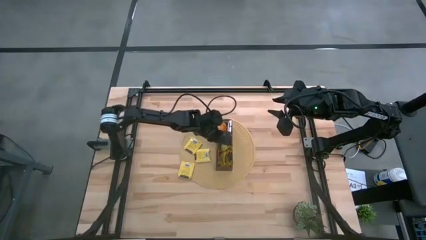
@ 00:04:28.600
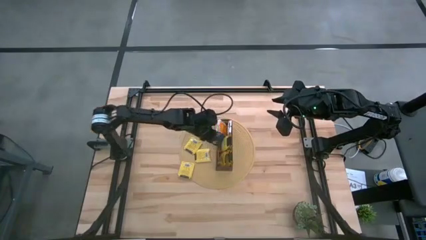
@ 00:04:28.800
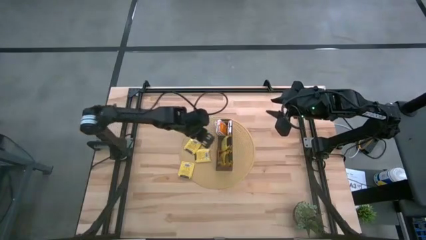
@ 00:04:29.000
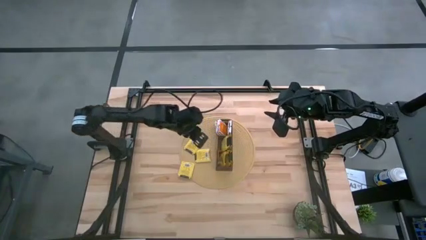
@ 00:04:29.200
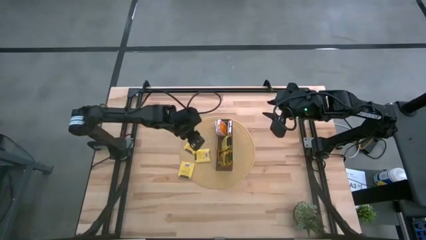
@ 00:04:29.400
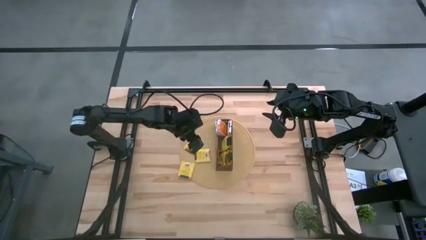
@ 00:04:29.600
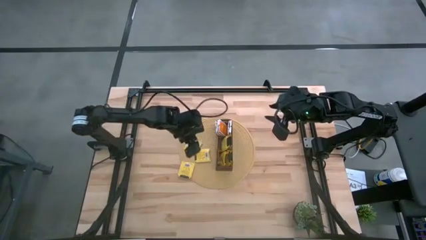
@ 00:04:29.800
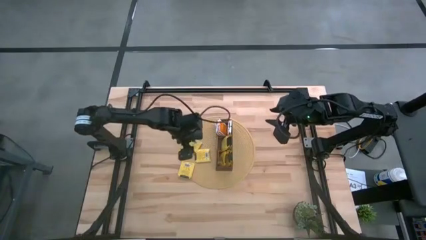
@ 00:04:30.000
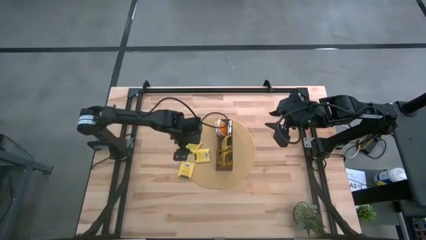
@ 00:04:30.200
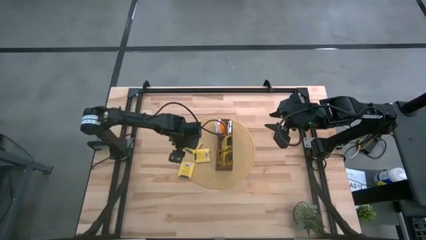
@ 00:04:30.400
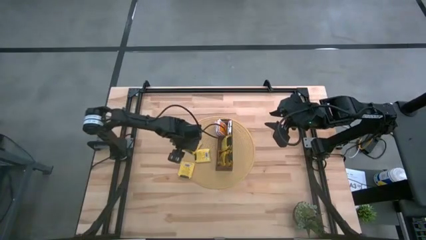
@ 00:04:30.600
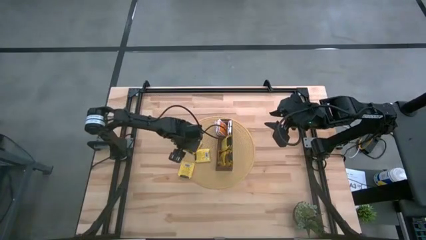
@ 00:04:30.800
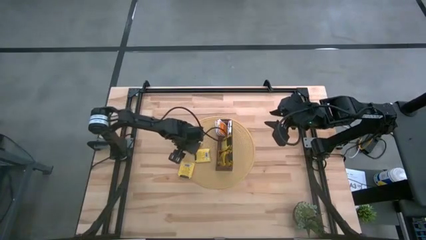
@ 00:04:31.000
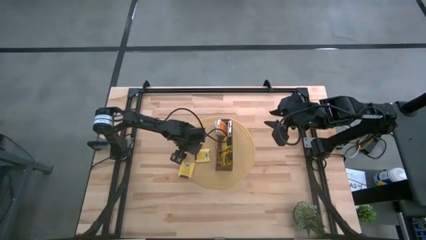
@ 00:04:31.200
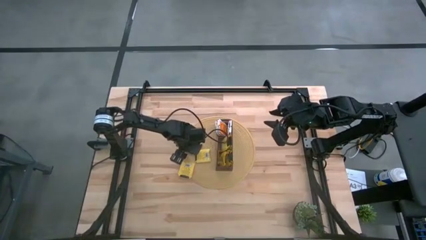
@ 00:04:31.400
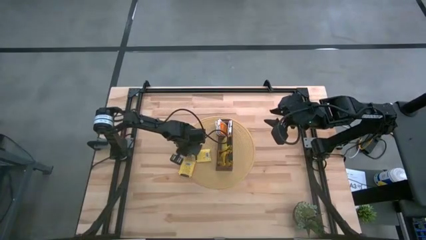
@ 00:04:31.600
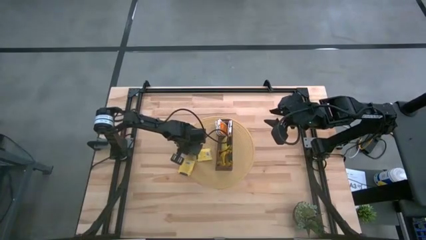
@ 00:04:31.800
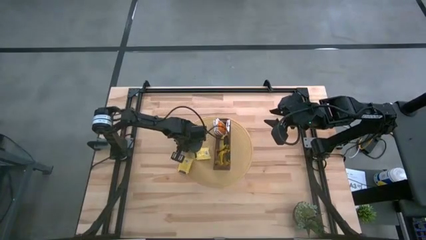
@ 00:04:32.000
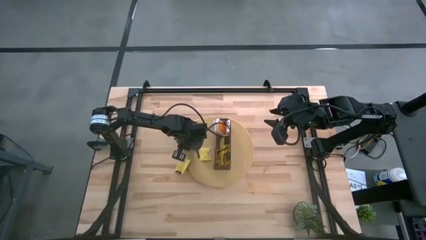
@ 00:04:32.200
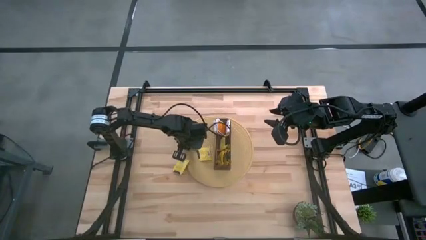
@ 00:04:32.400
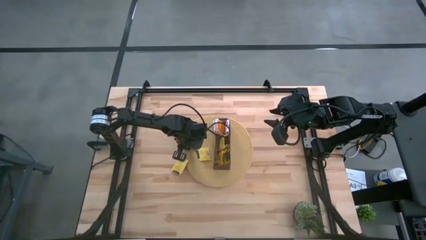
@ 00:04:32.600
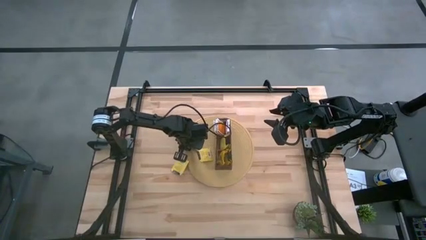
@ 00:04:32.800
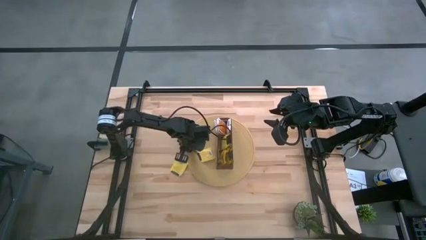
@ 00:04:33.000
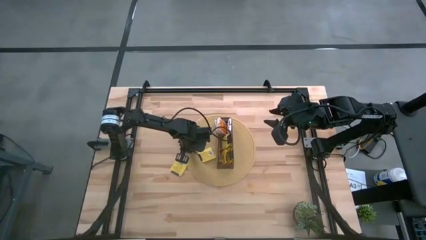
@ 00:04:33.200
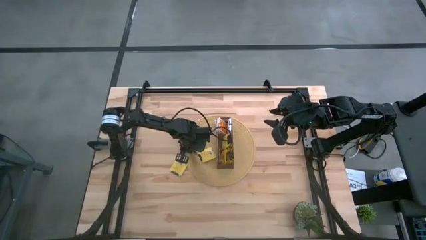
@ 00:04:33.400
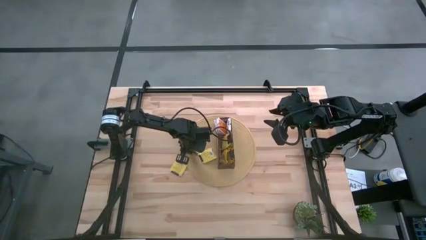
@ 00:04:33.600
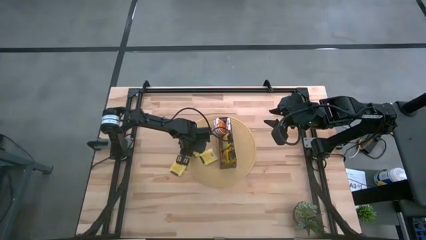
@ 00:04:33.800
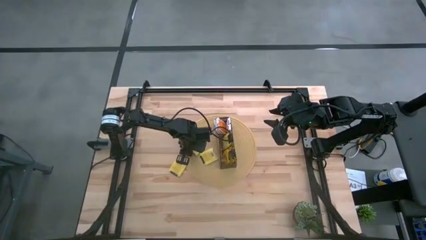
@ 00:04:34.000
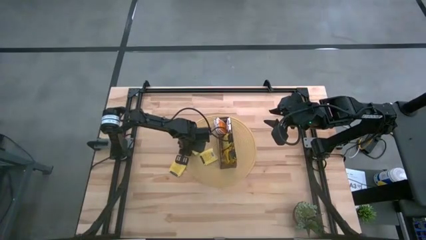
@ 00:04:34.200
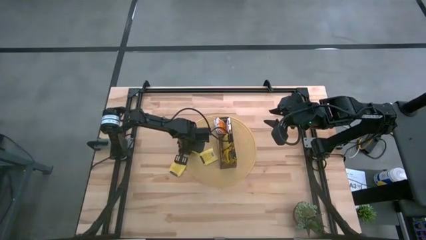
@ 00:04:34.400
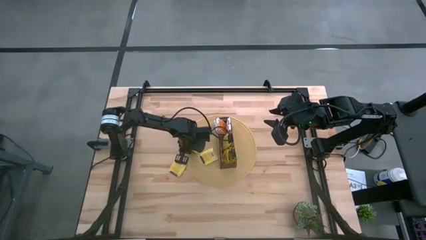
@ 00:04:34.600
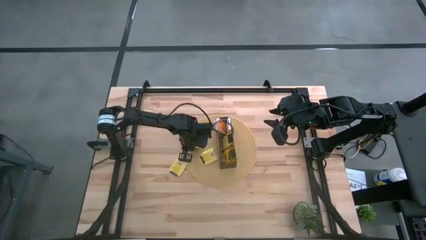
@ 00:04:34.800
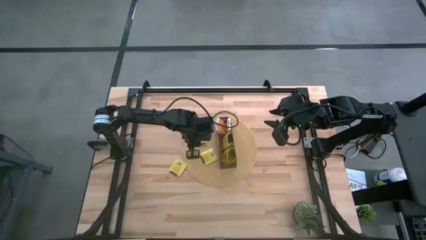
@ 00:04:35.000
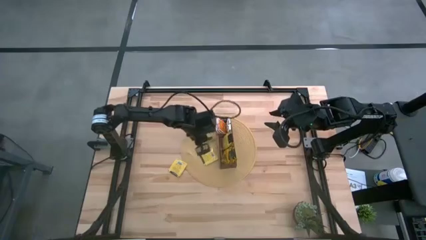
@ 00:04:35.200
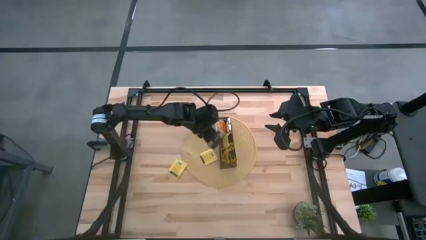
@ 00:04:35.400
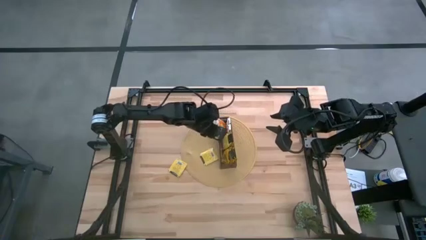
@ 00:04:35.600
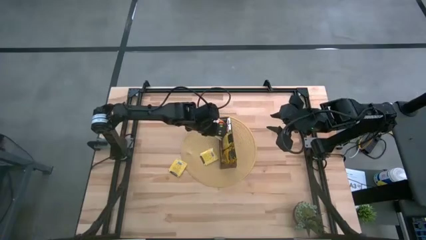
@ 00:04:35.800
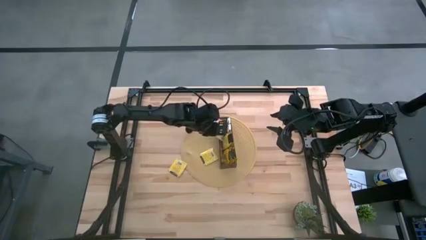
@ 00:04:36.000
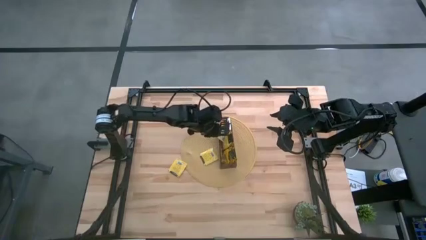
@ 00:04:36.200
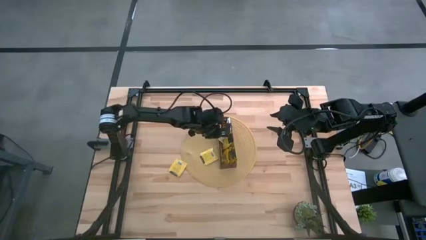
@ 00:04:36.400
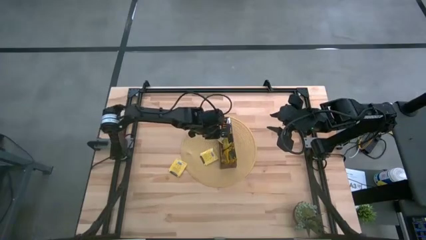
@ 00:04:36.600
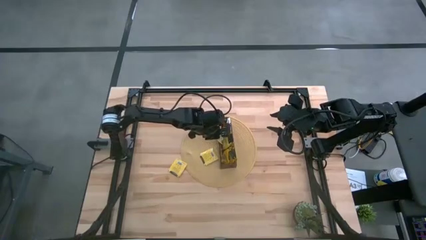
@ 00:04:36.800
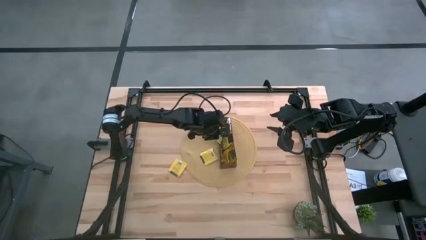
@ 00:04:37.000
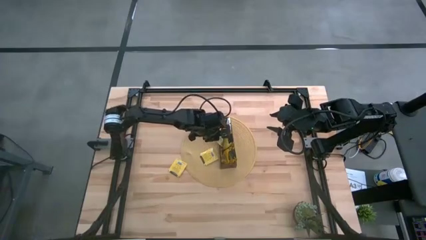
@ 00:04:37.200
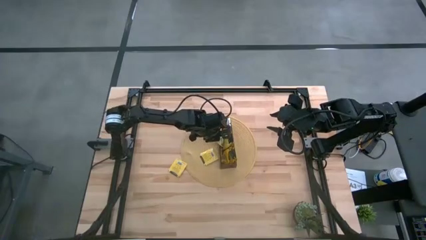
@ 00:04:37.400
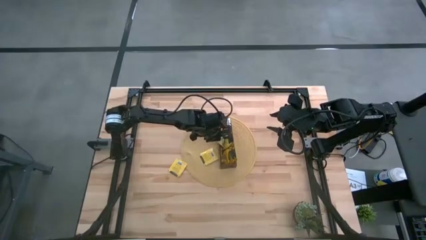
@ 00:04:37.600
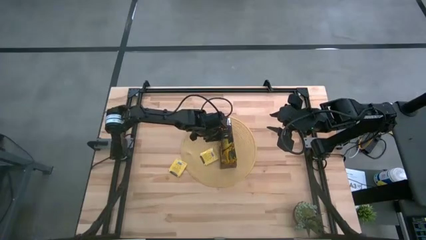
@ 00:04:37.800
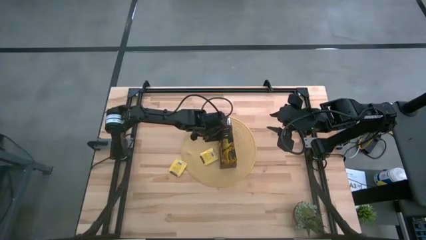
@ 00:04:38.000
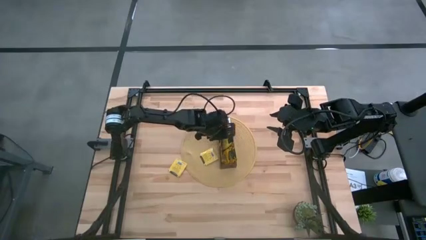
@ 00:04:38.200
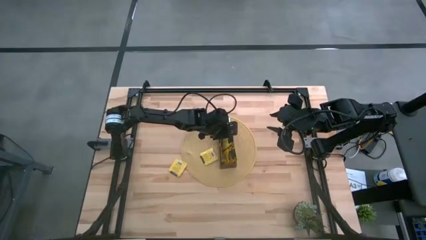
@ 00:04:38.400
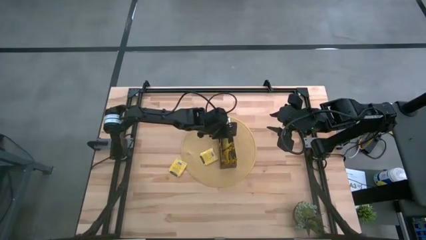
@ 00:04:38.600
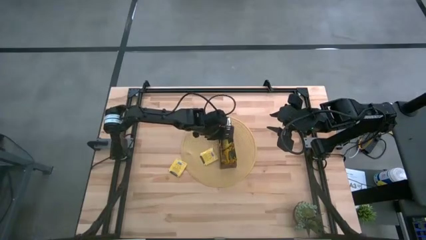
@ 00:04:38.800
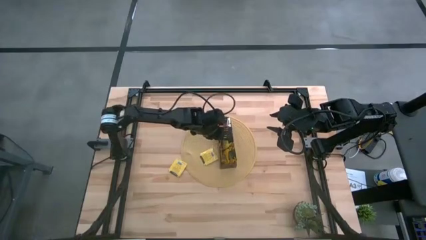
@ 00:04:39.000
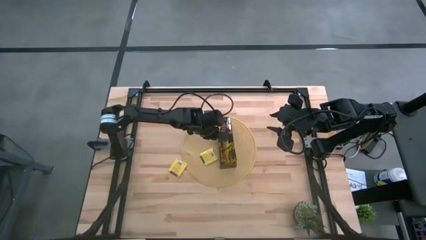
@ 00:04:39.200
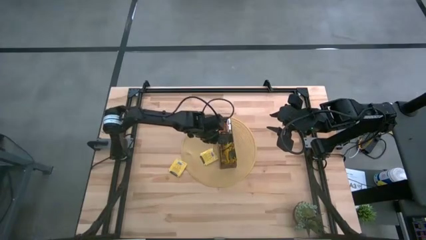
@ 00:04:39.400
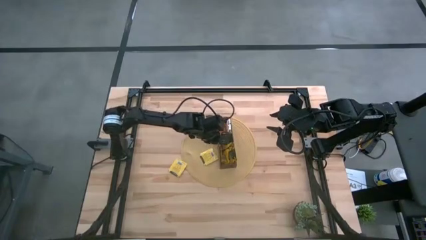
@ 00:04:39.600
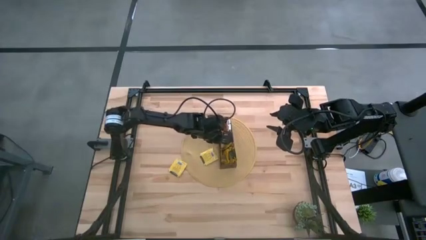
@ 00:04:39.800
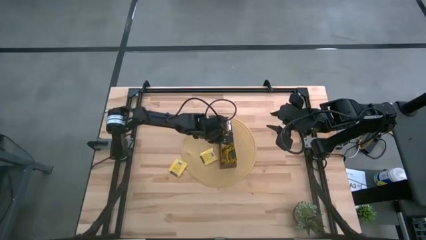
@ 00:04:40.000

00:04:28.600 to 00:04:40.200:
Task: Pick & Place Tea
Put the top yellow tea bag into the middle section of the wooden organizer

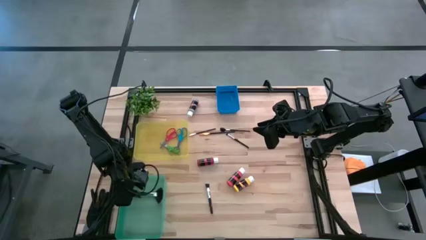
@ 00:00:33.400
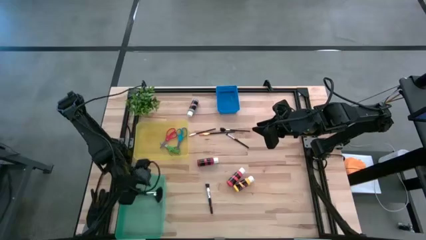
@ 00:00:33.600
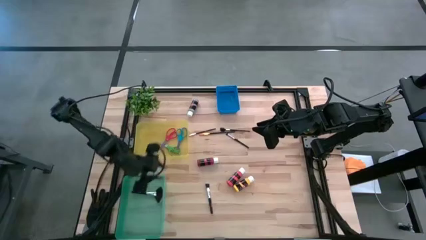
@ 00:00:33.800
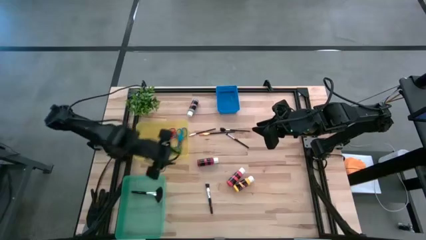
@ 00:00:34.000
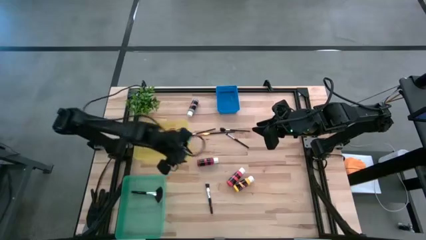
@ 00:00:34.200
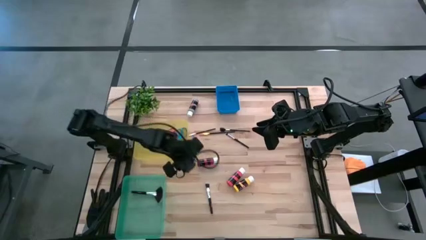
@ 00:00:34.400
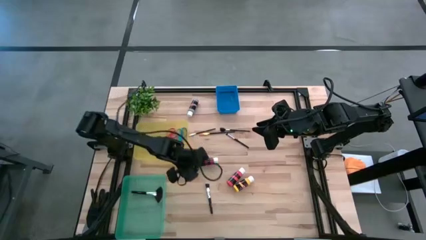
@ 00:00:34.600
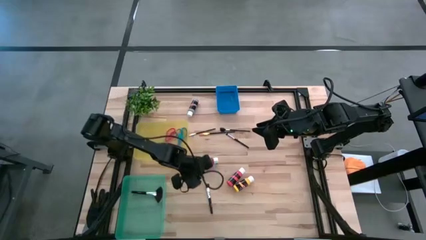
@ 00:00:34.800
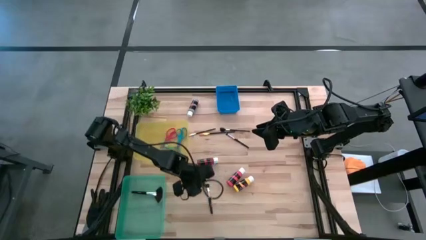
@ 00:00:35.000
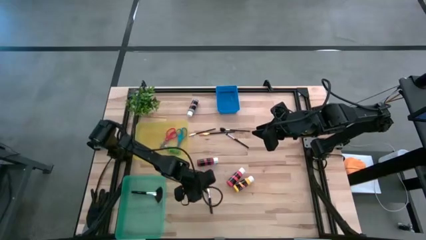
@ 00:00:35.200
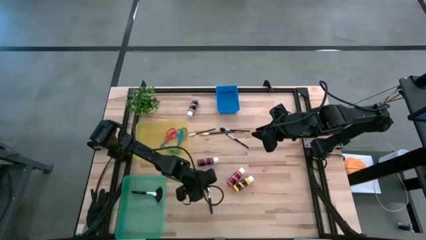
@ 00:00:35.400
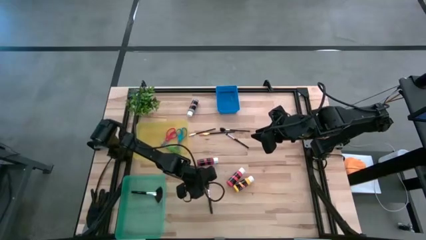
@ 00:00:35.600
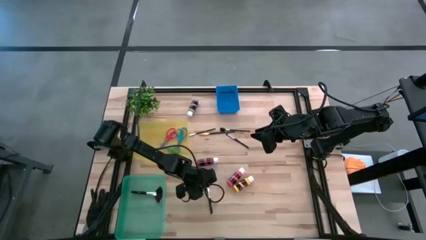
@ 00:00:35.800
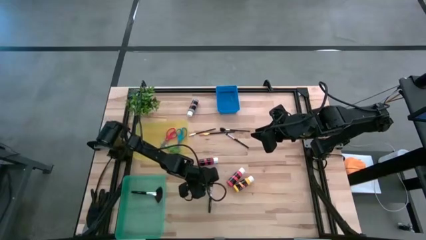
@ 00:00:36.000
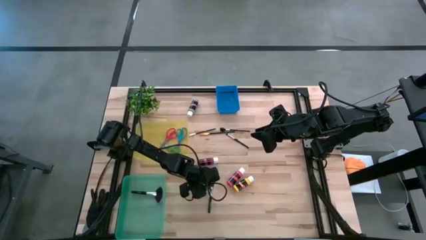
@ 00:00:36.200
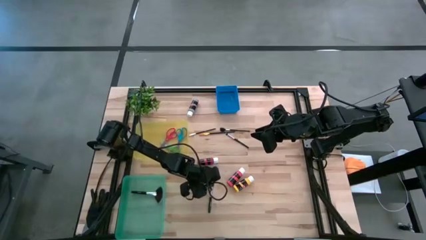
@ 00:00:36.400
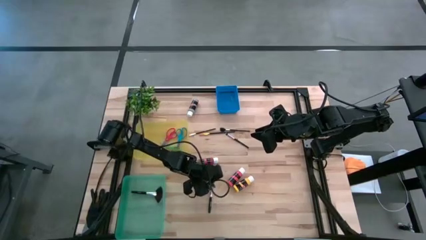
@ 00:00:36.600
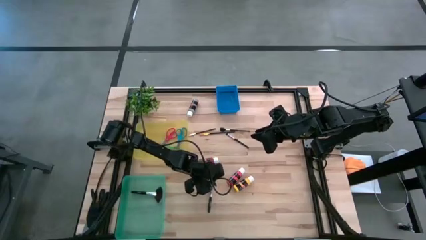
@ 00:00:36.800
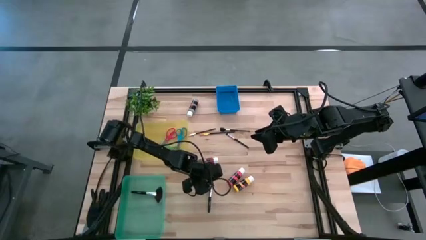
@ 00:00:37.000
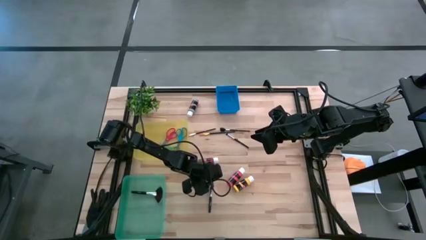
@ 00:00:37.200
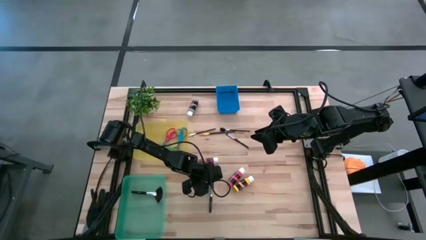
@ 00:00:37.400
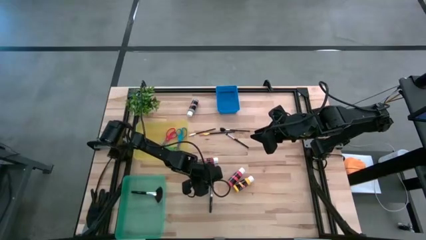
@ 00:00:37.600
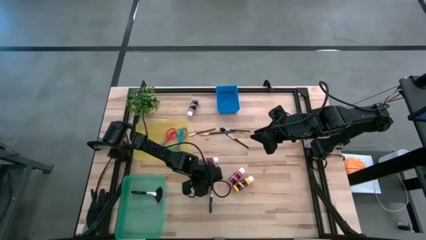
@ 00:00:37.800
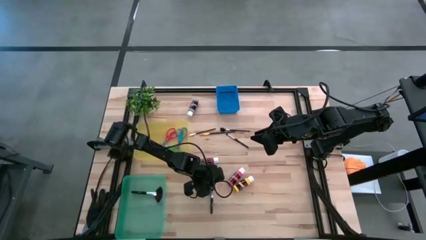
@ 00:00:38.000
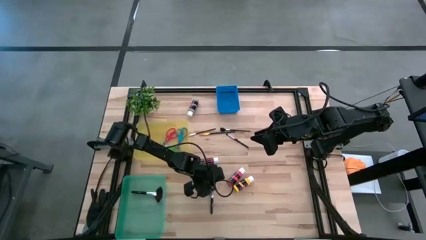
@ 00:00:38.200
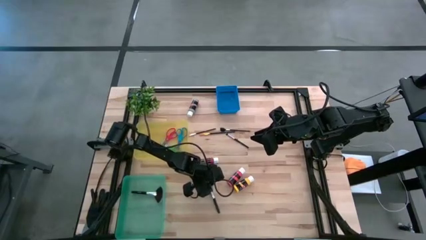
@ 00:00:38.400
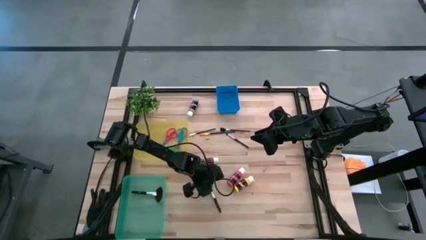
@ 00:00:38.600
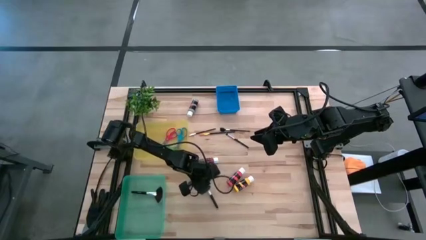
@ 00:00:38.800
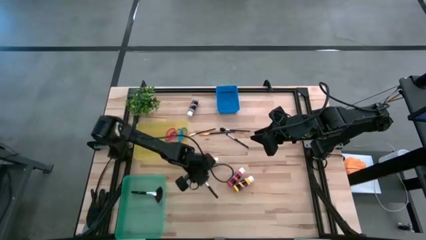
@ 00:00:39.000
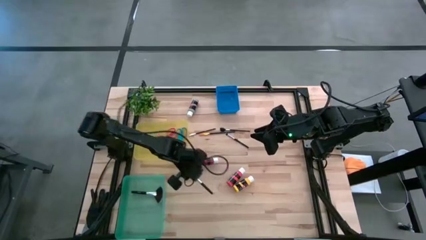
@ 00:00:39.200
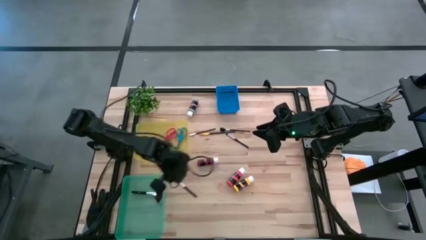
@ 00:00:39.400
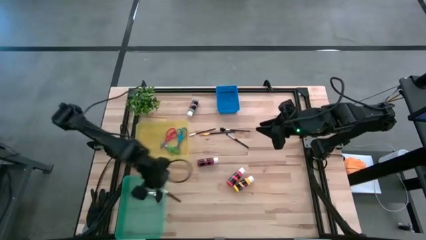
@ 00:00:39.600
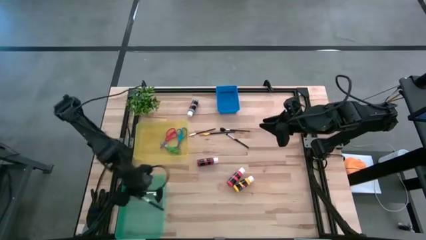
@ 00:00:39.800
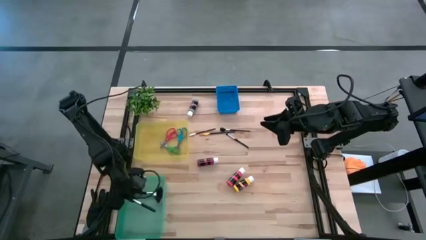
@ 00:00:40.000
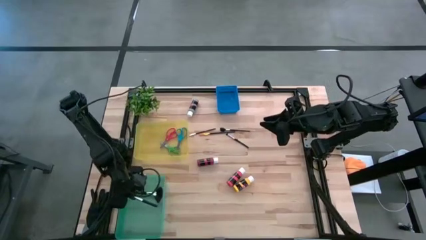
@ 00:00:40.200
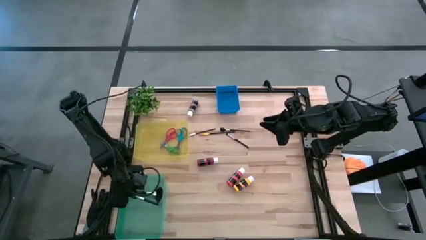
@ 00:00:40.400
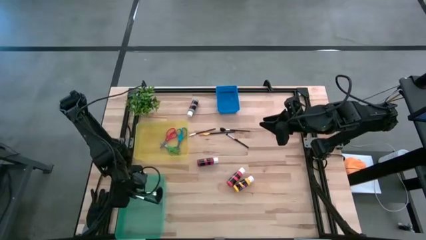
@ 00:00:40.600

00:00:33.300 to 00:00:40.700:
Task: Pick & Place Paint Supplies
Put the foundation brush into the blue bin
